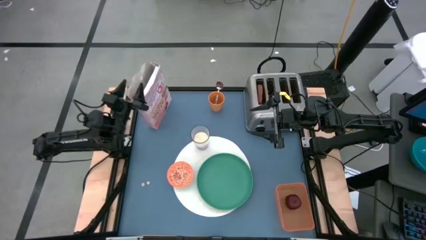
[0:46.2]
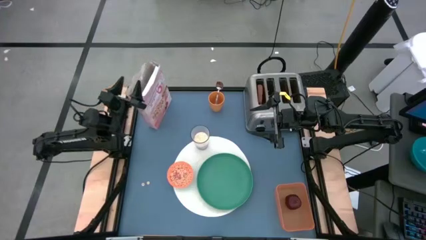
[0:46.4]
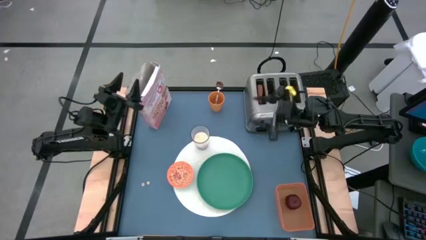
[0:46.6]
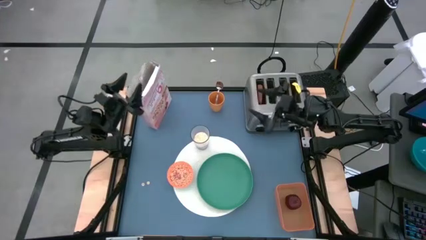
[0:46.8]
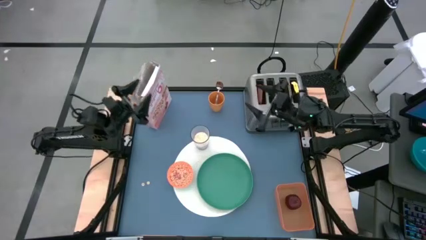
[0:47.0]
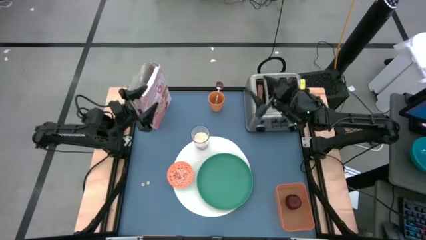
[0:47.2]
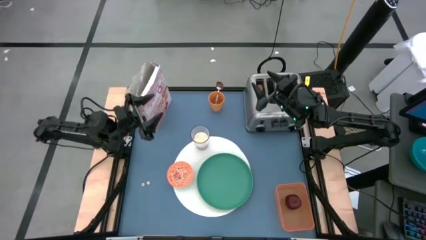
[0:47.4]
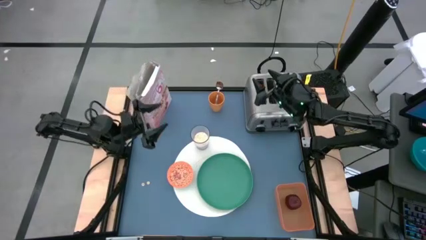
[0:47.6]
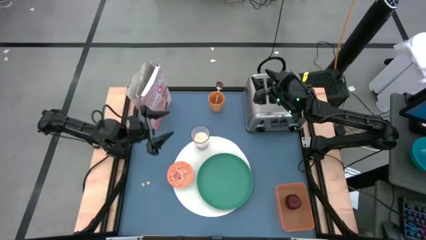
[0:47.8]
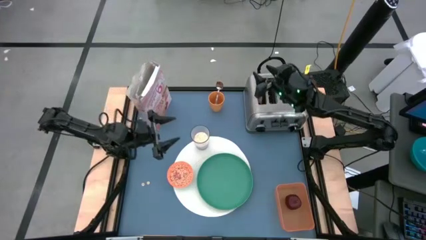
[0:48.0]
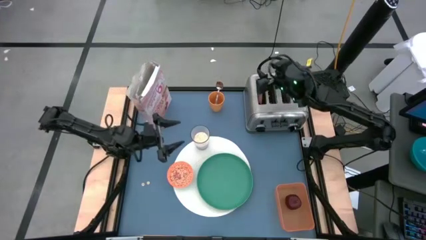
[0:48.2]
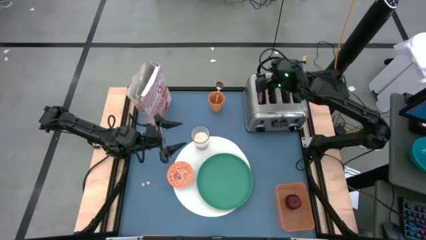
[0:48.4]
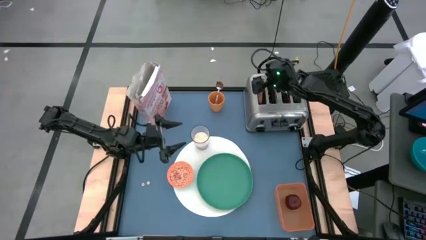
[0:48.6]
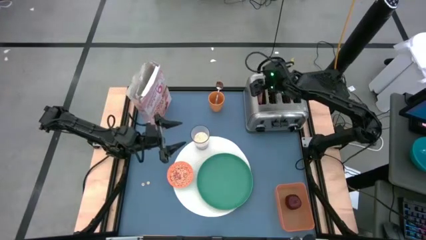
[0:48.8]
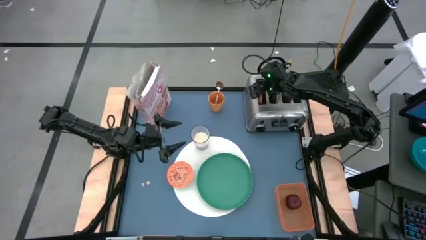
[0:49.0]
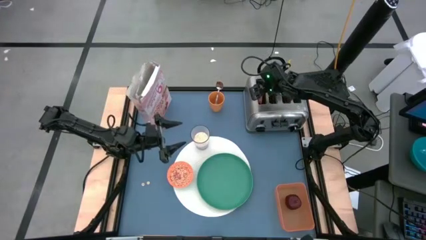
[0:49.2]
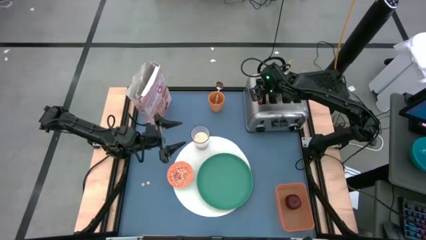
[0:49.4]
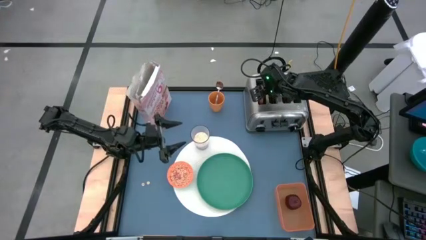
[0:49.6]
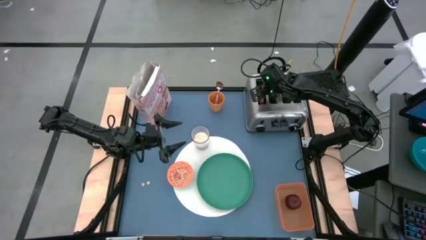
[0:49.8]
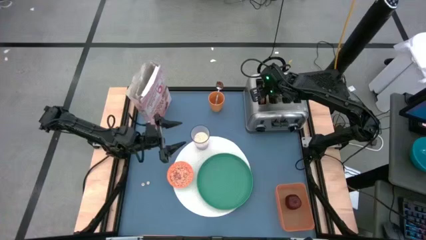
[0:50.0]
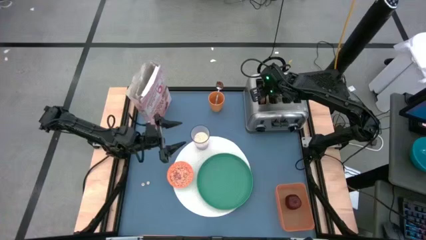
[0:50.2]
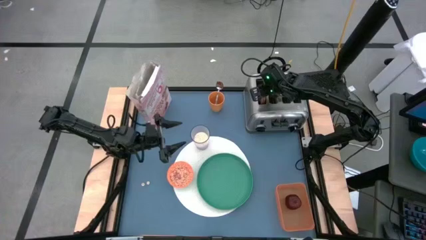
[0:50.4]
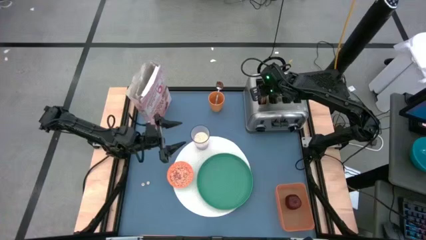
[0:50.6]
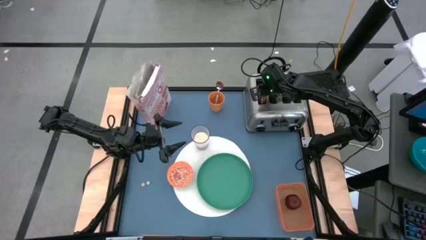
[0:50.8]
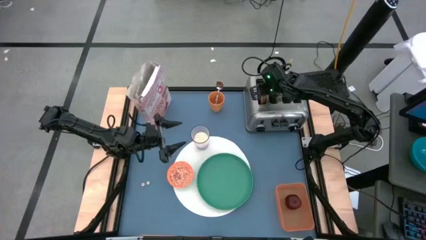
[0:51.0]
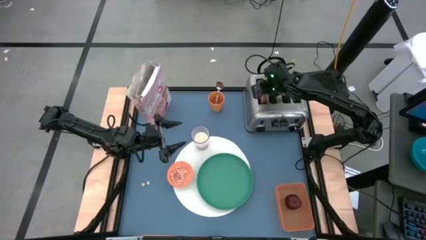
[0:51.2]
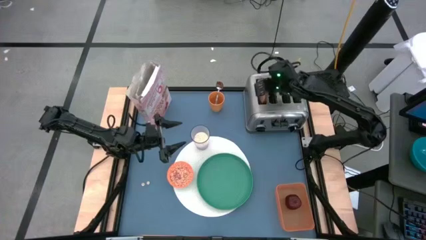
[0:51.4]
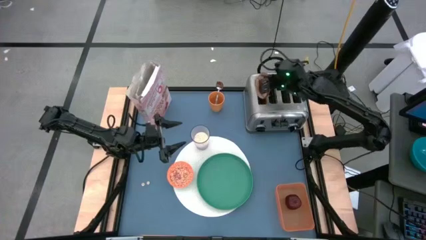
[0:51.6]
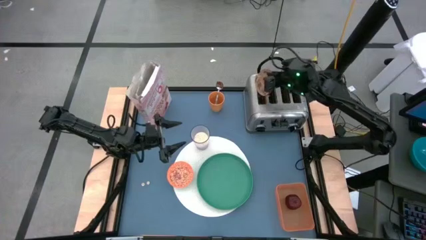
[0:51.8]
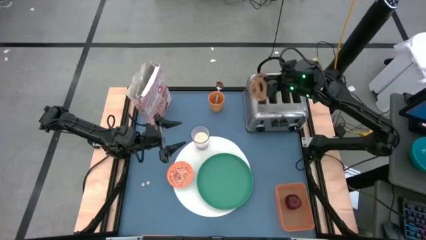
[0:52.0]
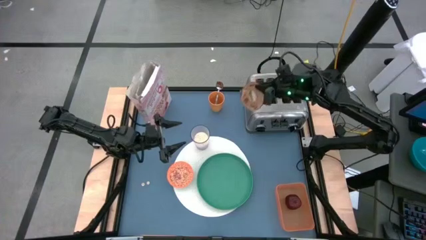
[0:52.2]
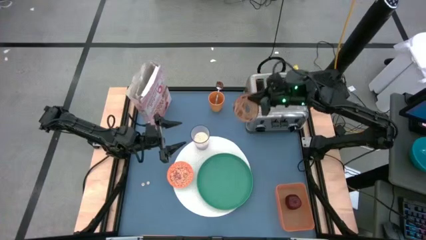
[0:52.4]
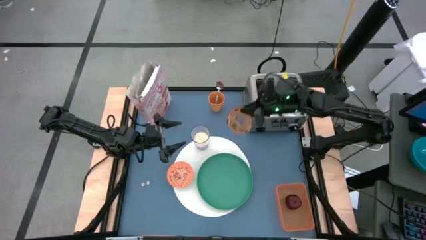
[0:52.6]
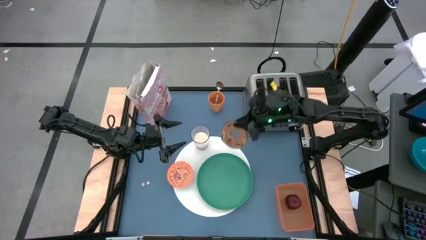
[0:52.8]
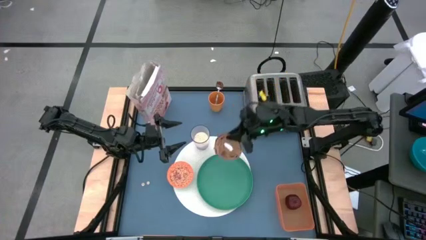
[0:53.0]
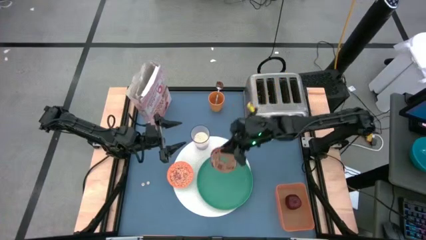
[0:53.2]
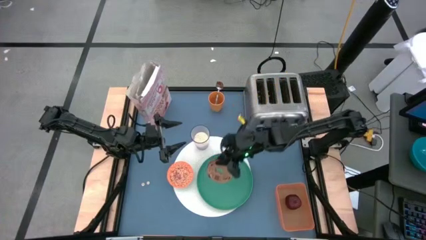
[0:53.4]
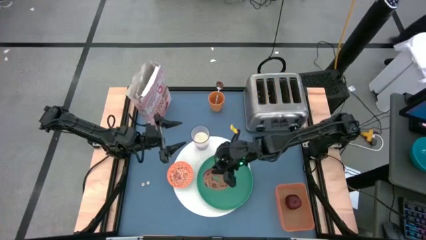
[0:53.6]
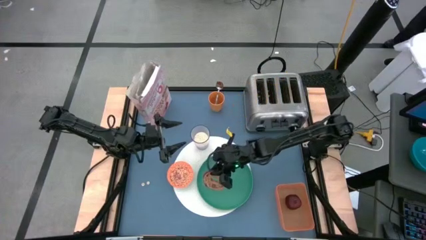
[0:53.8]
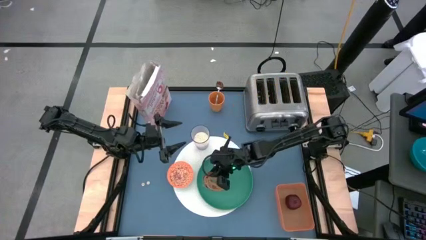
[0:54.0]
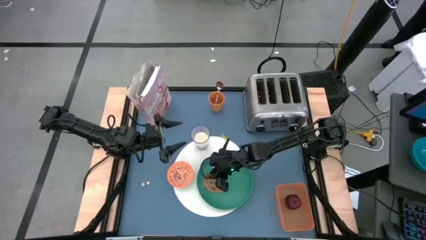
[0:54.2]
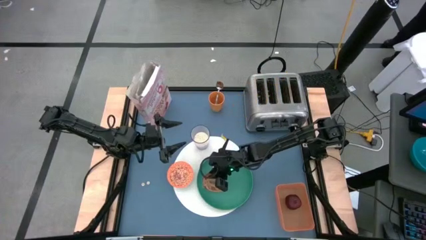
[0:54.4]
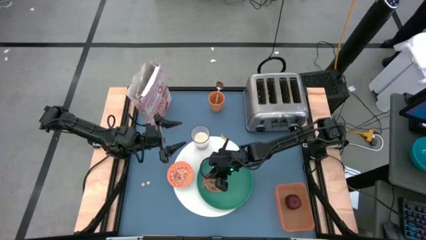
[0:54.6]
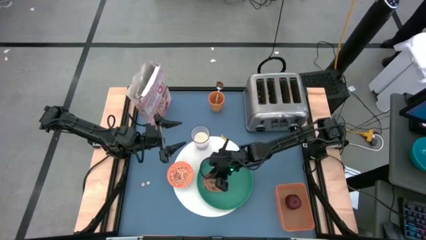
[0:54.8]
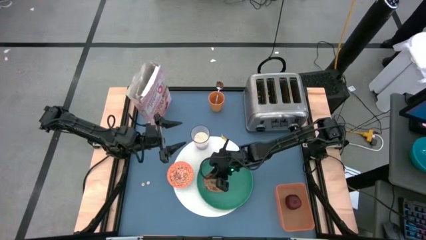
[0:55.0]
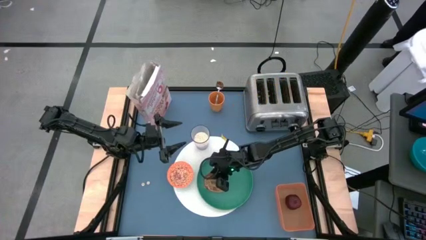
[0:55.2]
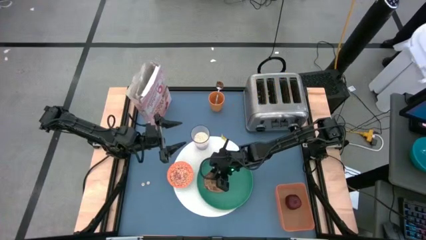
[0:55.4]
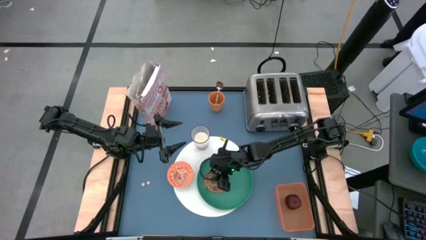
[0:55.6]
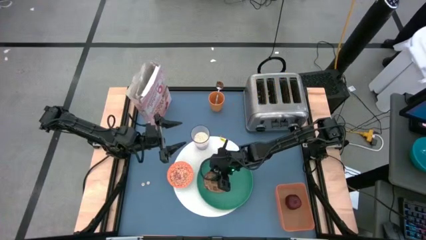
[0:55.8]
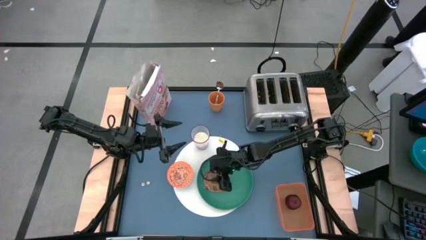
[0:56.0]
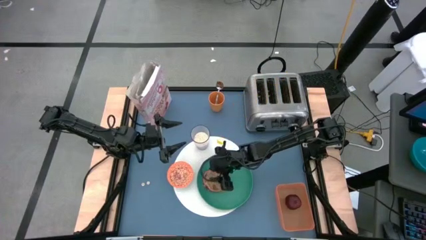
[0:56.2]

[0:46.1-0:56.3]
Task: Arrange a breakfast setting
Put the toasted bagel from the toaster on the green plate

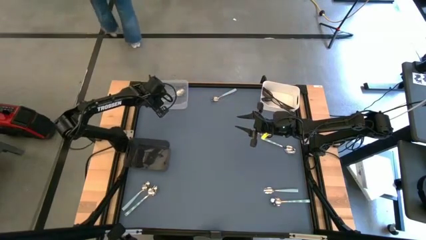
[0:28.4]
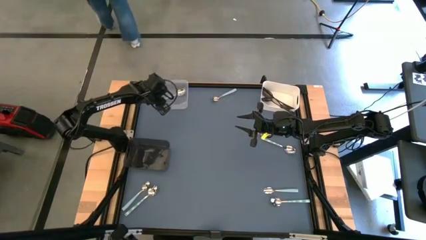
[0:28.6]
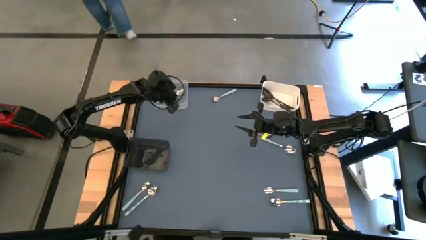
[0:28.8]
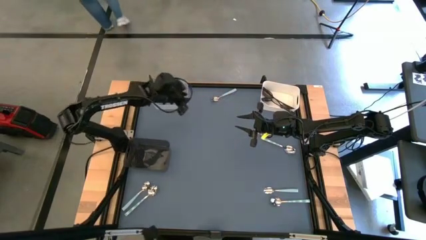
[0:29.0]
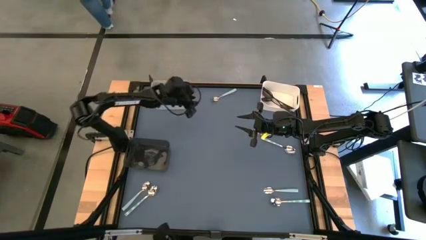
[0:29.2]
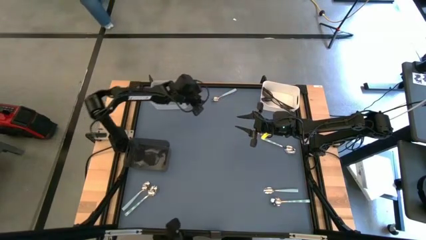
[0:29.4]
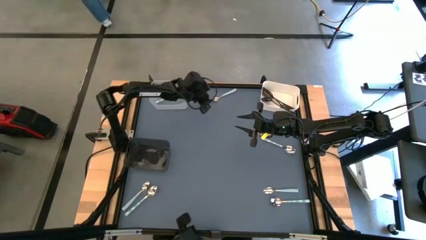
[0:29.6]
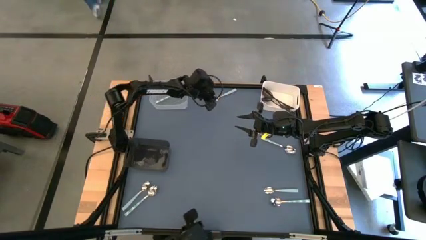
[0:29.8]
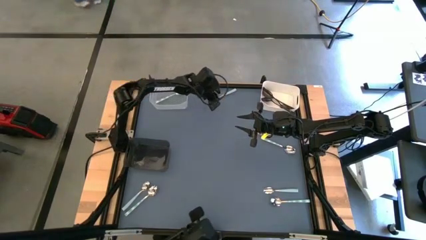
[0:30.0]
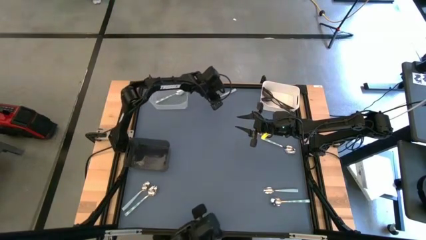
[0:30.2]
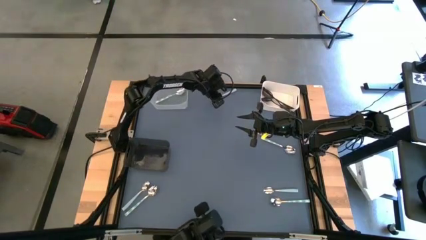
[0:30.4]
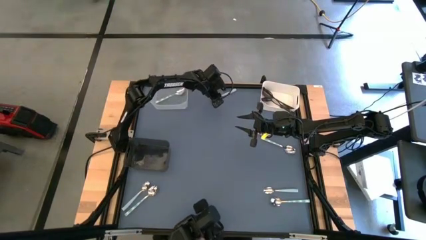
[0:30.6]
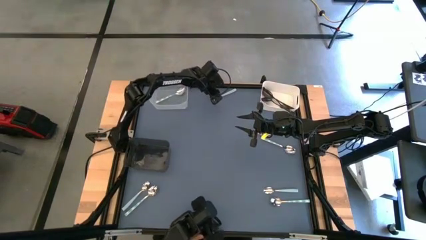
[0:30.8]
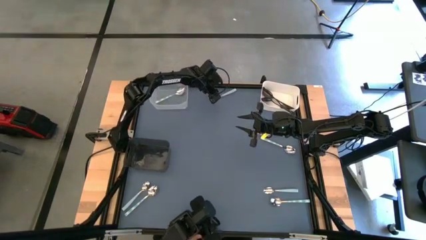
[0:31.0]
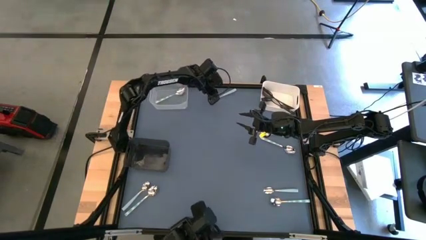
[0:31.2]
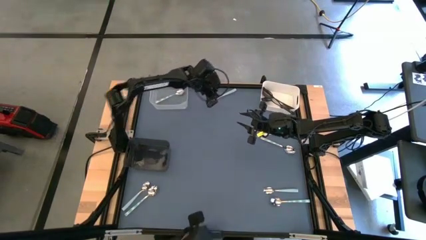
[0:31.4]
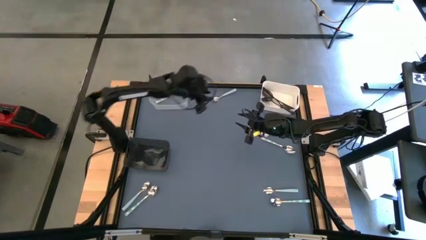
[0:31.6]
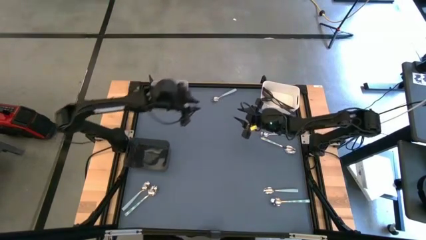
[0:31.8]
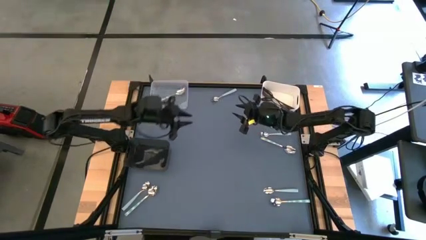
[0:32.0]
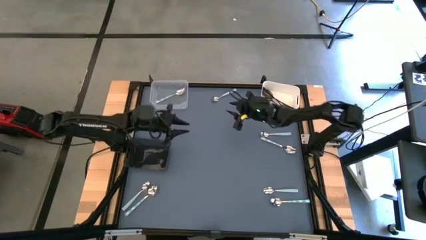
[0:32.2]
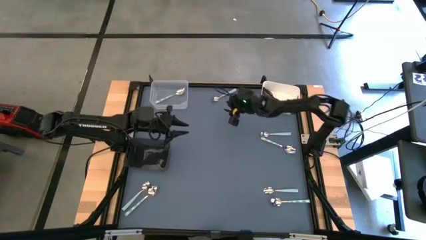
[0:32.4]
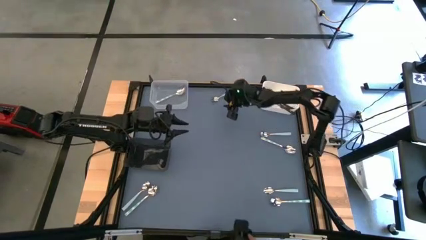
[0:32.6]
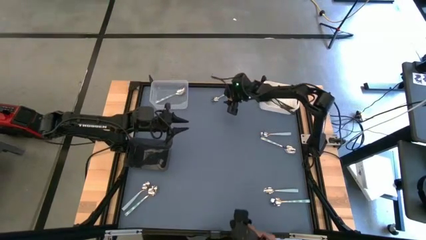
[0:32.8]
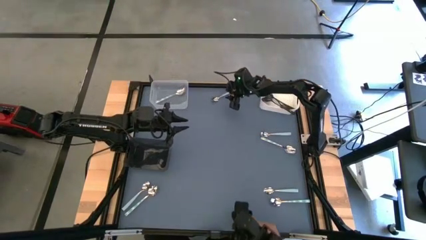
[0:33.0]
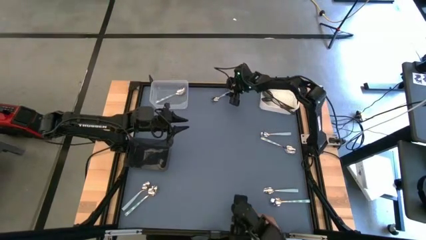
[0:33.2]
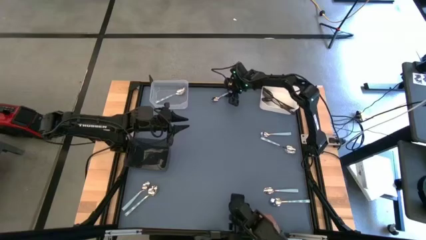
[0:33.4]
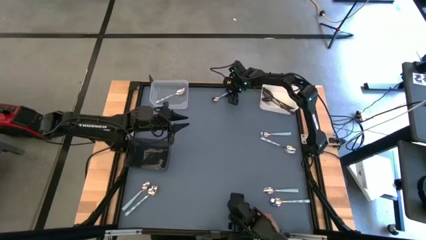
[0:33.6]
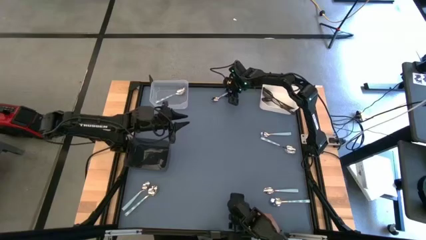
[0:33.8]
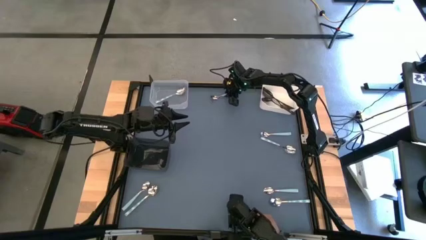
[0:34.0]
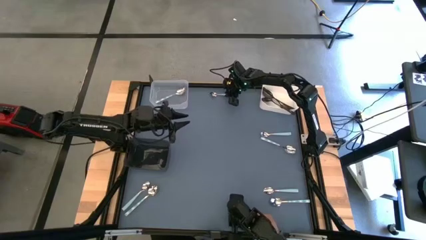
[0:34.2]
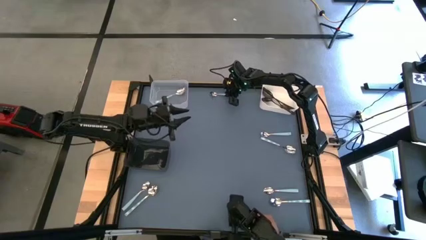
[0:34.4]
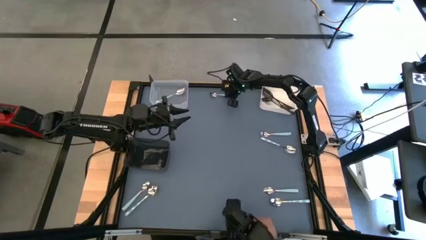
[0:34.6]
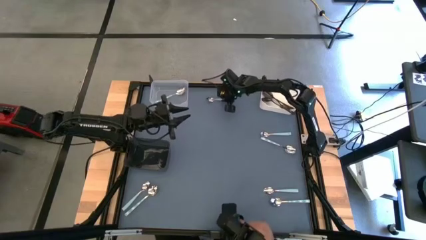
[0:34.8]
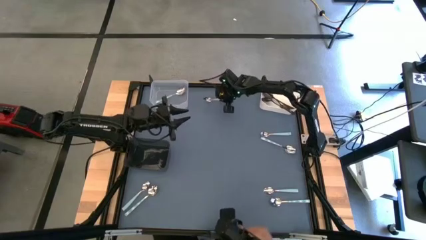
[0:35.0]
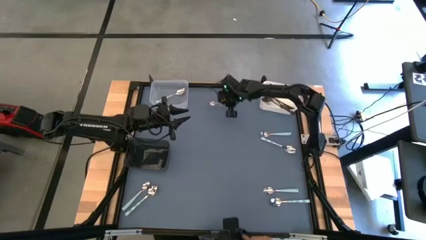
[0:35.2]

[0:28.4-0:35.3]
Task: Sort silverware by color (type)
Put the blue spoon into the black bin

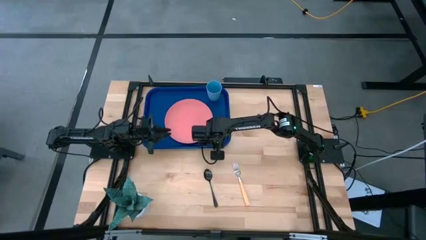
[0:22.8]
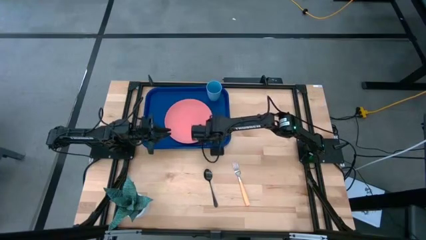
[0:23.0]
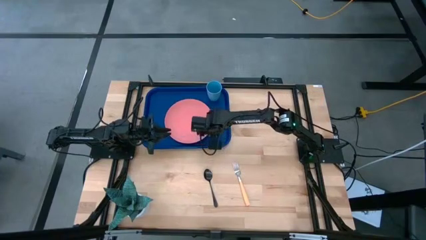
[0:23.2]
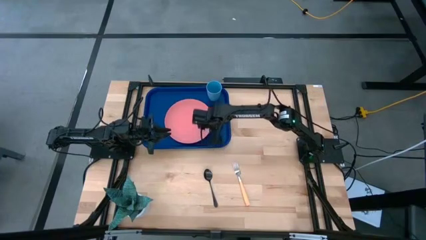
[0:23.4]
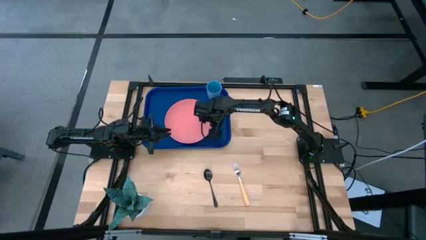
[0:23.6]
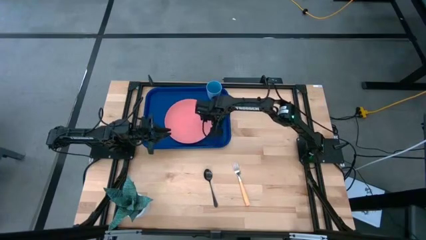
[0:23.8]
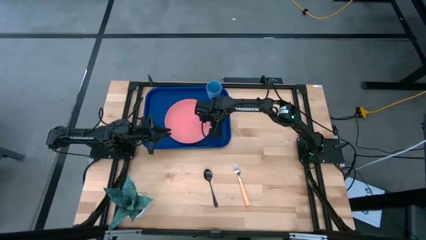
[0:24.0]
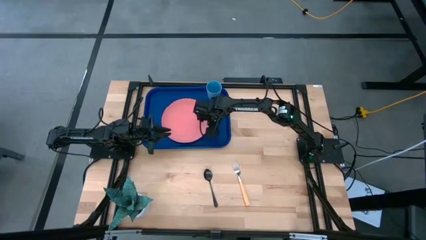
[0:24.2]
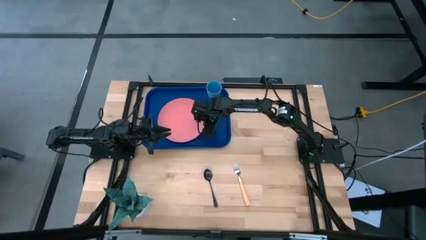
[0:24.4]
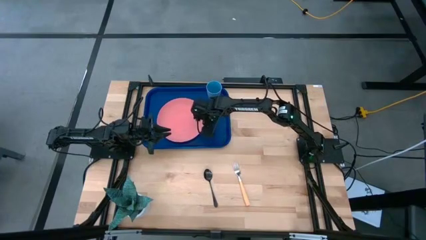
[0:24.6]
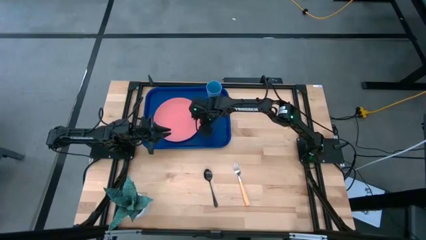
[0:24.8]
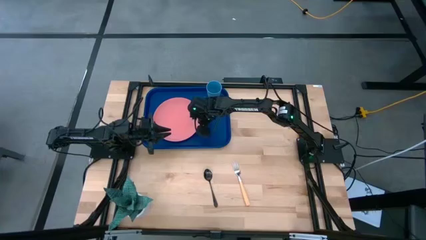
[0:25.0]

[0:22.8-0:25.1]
Task: Pick and place plate/cup/fork/spoon on tray
Adjust the plate
